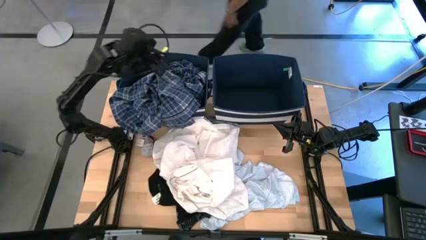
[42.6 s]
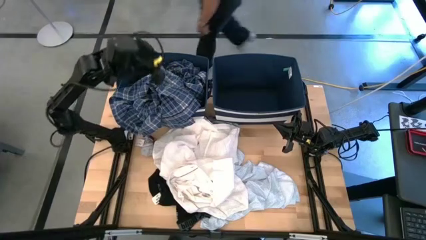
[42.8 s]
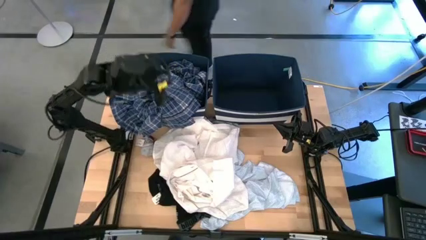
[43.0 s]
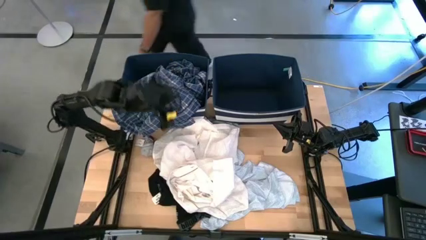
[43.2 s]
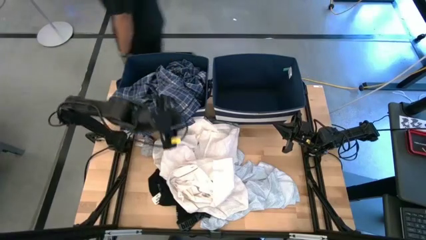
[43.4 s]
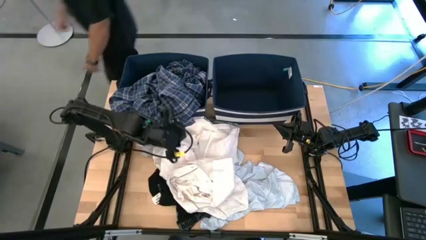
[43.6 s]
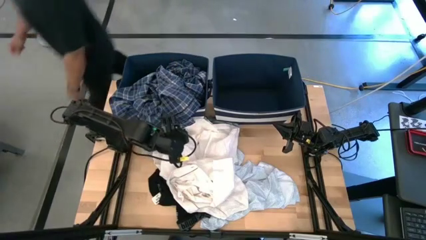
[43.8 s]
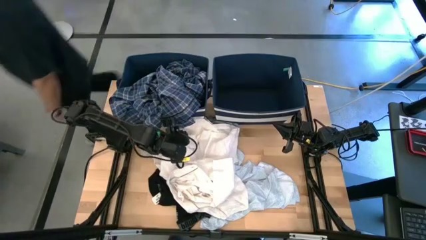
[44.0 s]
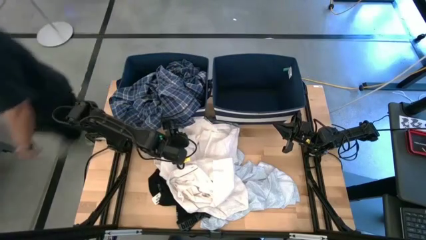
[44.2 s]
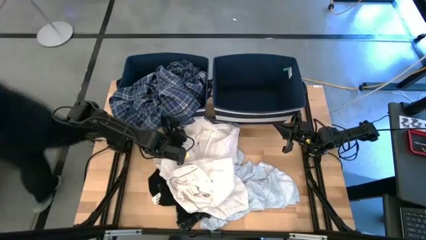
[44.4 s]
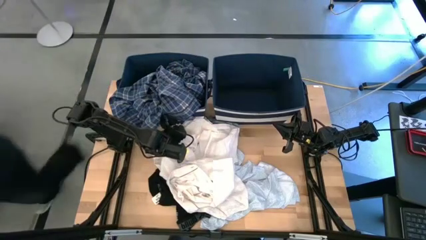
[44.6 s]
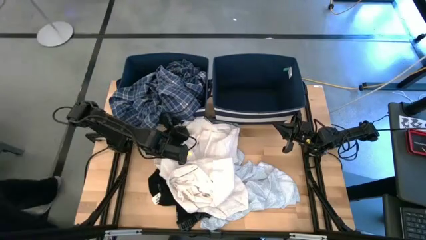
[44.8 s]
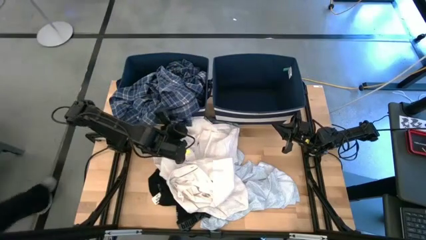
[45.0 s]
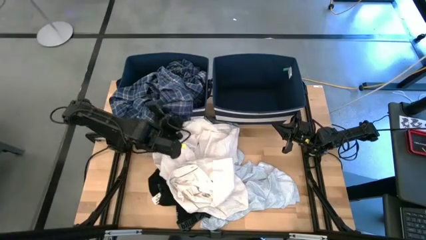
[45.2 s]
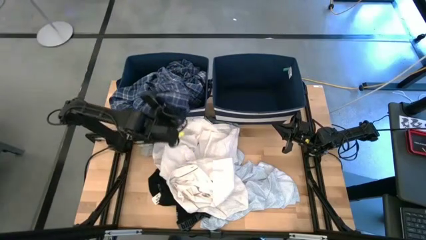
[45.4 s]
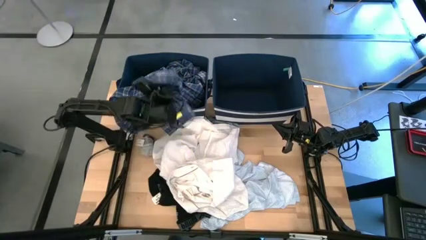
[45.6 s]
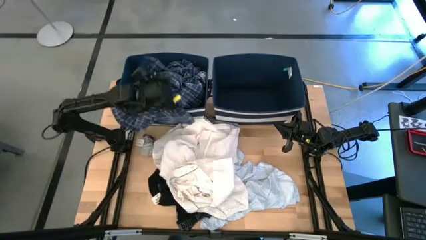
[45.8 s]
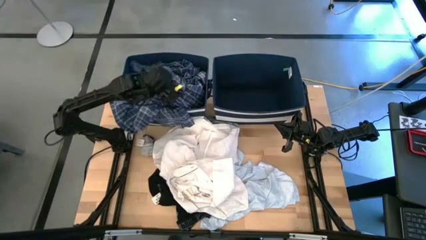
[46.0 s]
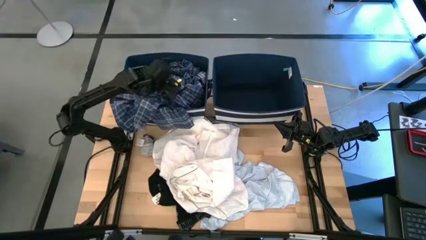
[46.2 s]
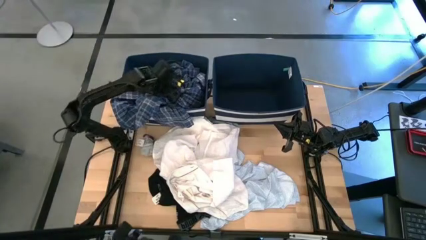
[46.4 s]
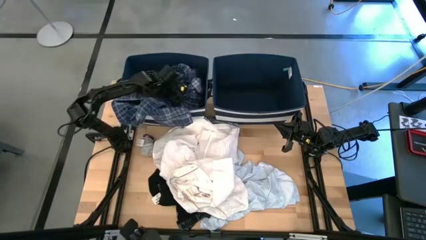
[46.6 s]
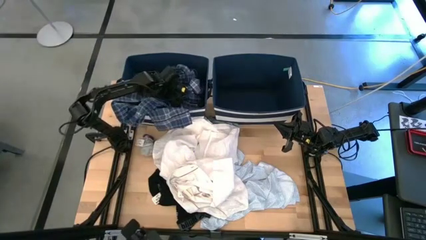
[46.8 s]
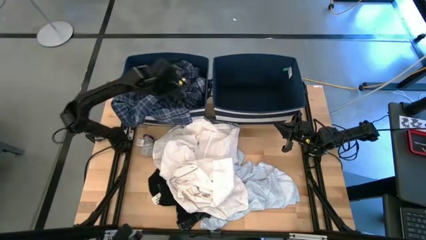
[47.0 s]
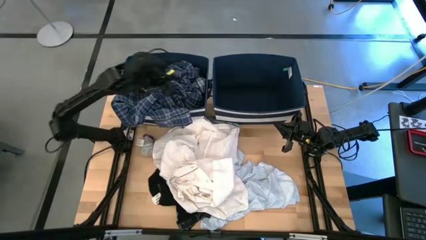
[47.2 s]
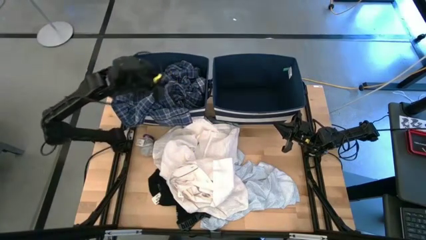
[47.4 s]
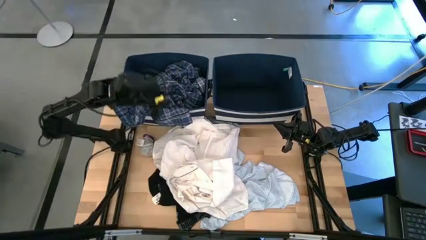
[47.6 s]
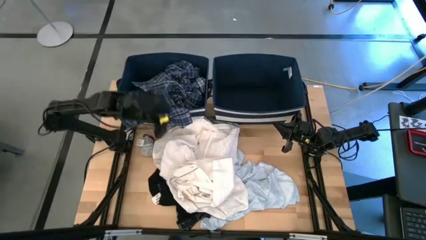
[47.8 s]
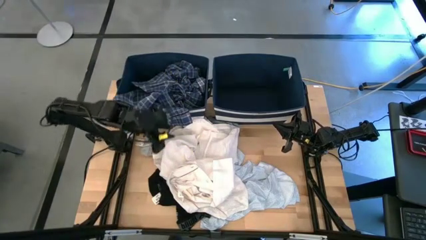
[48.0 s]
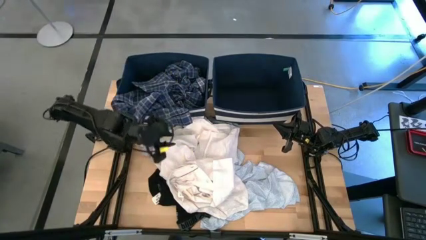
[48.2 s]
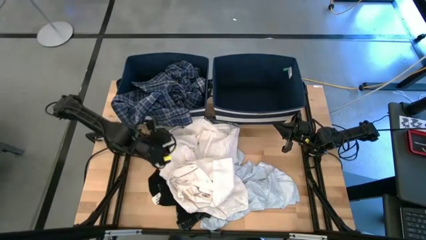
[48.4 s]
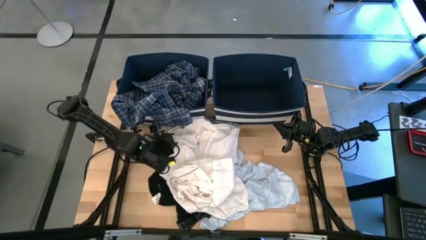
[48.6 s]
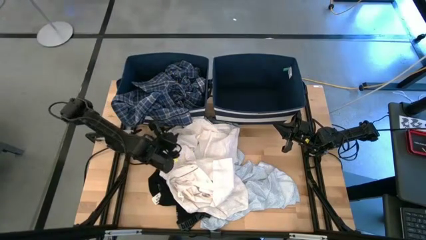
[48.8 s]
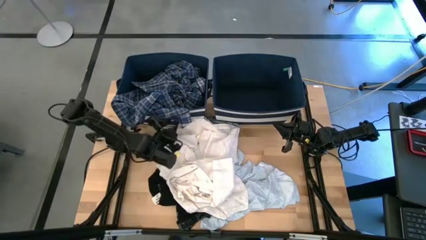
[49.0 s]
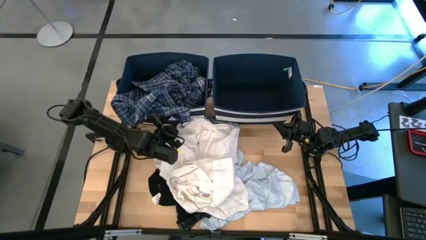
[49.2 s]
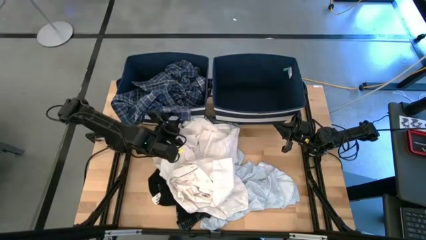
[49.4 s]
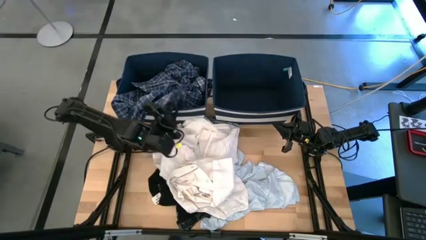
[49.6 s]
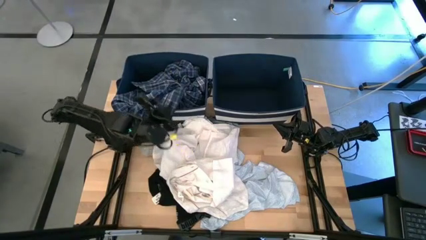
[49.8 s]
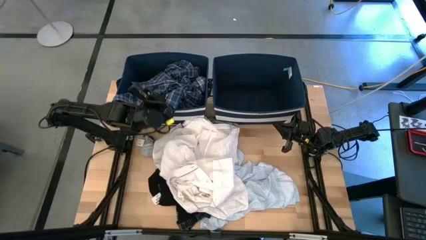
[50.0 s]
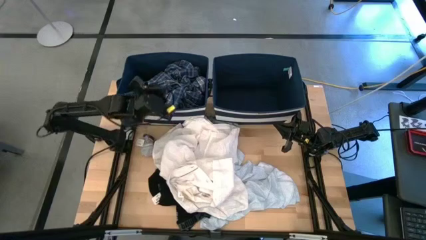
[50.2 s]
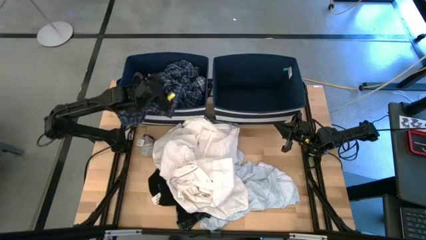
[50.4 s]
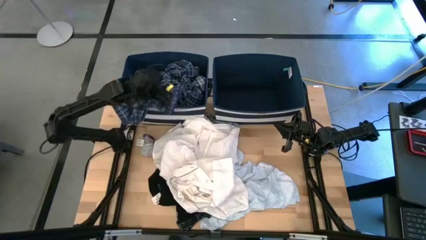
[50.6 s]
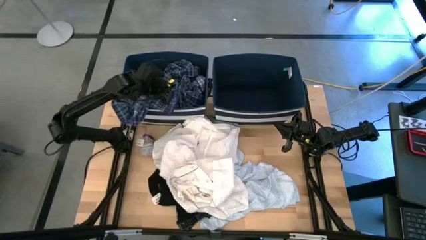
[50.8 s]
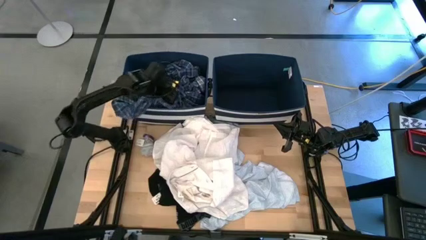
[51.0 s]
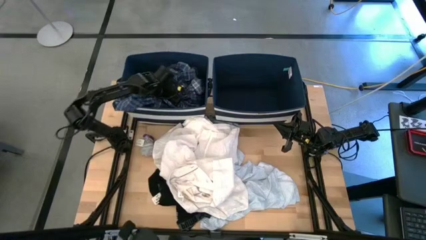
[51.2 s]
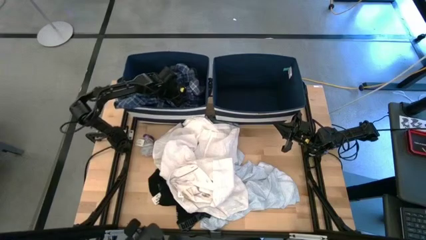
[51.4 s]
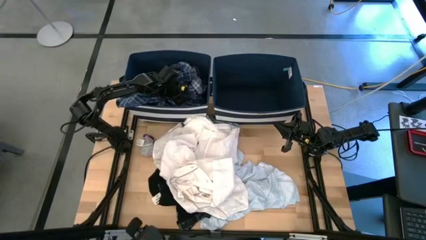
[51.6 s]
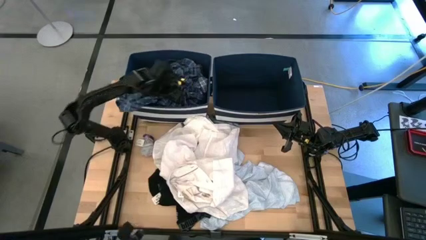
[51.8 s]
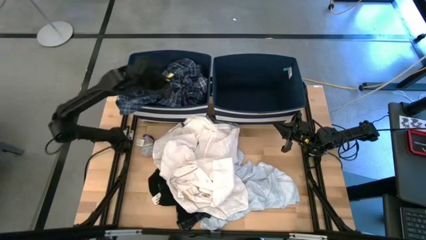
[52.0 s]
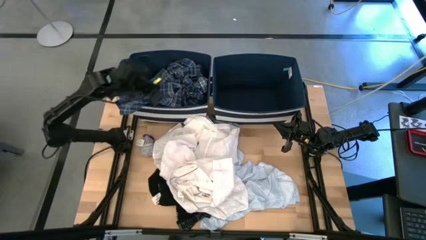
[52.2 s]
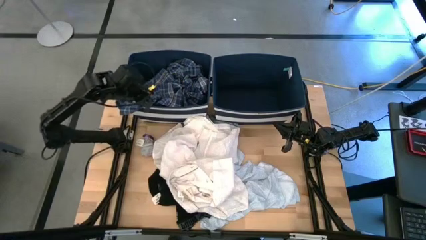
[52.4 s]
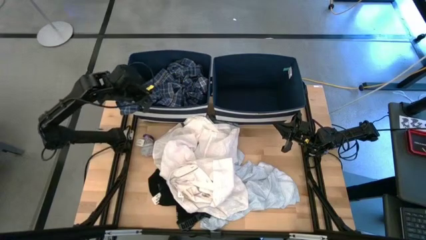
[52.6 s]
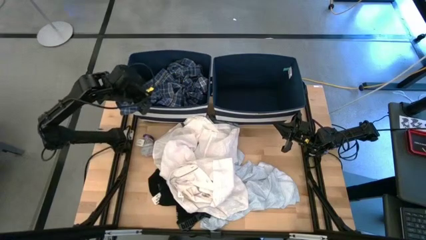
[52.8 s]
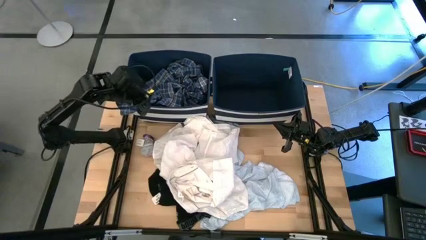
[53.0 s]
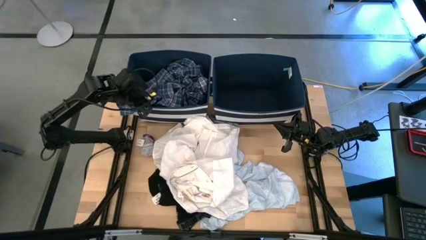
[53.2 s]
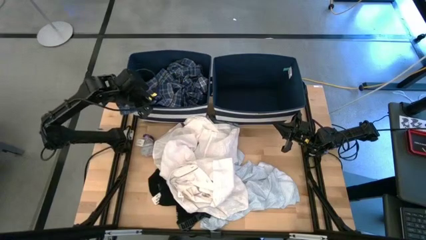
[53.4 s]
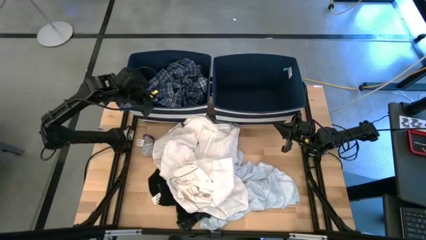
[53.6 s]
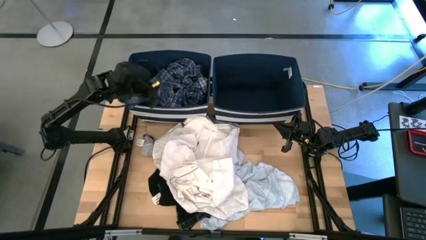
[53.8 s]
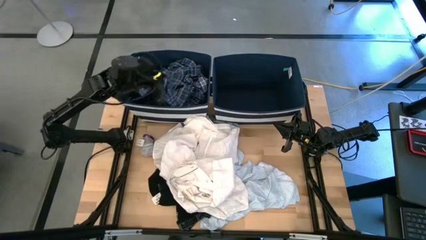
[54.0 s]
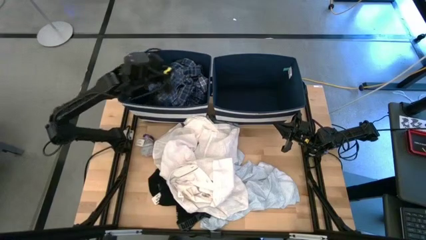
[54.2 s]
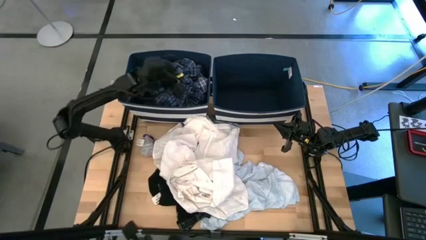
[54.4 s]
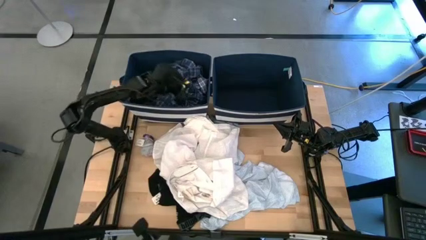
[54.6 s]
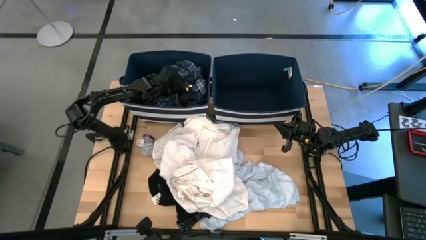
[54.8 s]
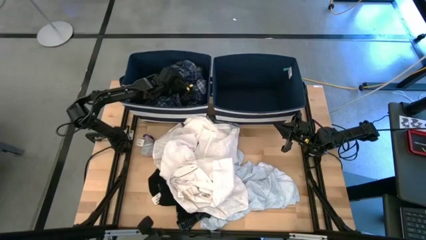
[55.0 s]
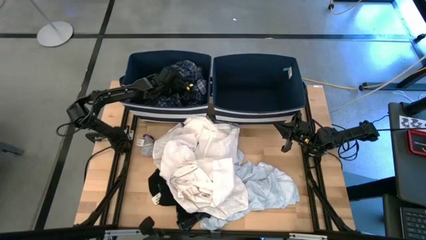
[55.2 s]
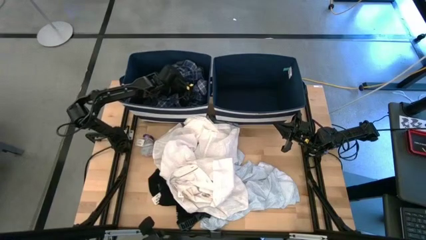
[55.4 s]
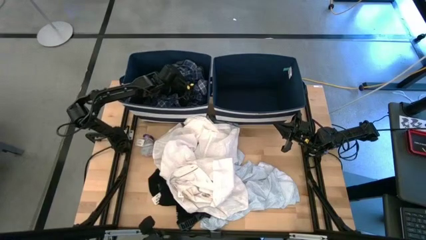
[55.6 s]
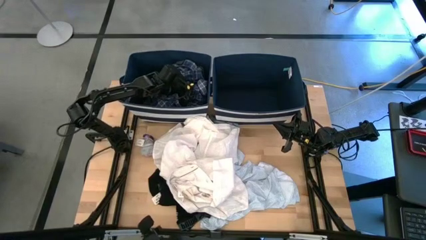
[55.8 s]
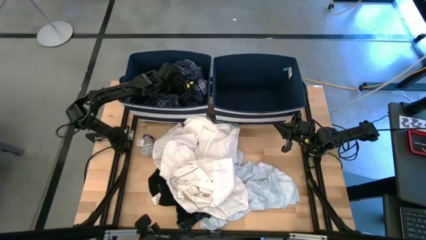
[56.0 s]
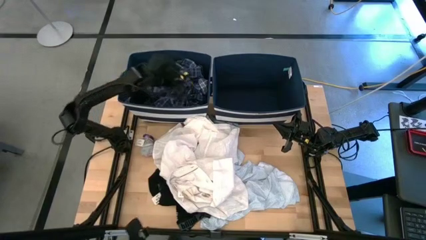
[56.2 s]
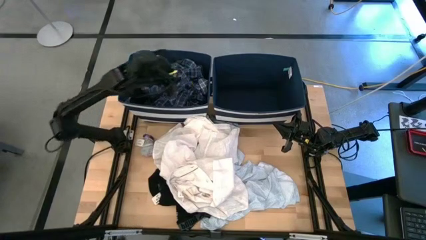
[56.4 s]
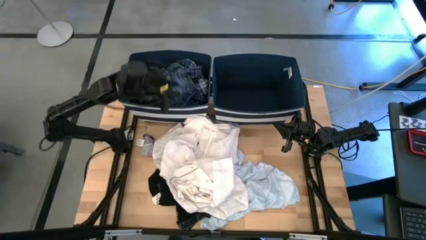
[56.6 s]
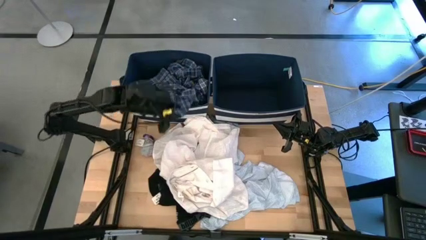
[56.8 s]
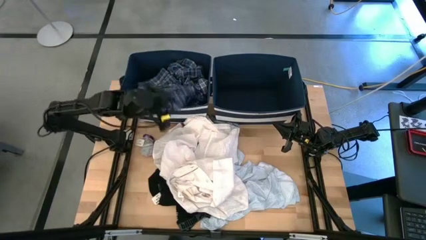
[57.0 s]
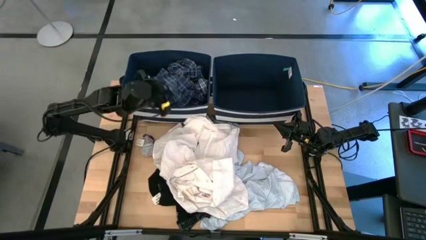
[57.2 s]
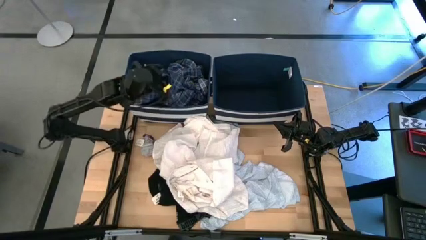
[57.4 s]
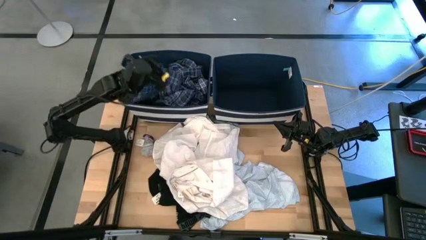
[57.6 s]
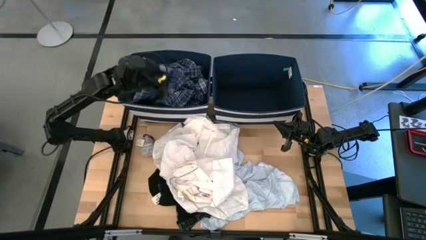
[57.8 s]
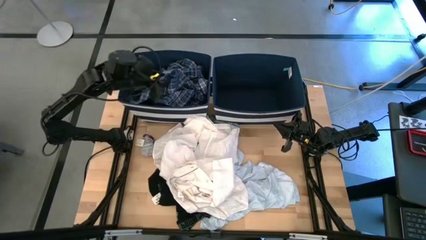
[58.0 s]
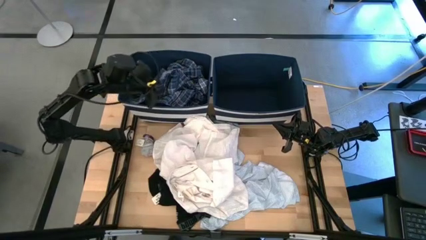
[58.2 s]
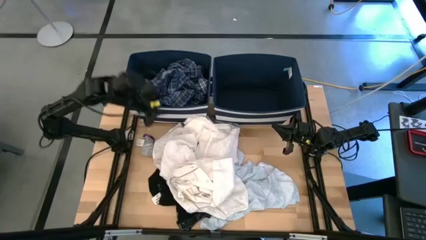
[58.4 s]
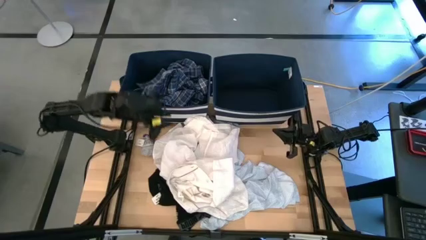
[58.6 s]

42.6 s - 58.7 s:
Task: Sort clothes
Put the long sleeve plaid shirt into the left blue laundry bin
